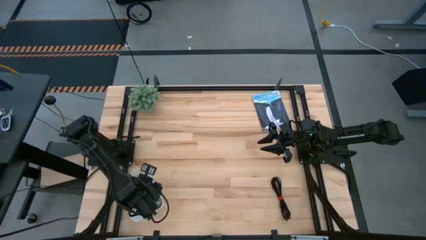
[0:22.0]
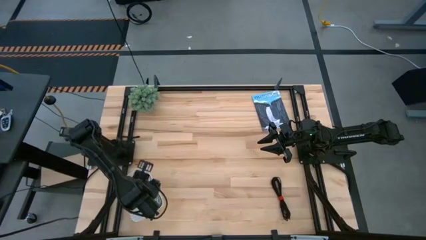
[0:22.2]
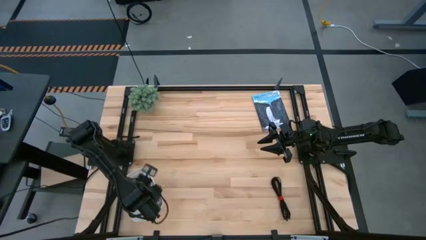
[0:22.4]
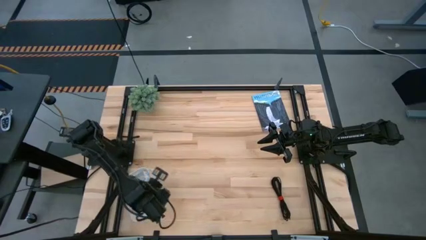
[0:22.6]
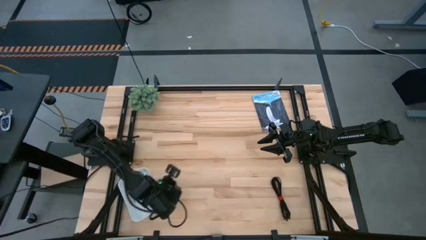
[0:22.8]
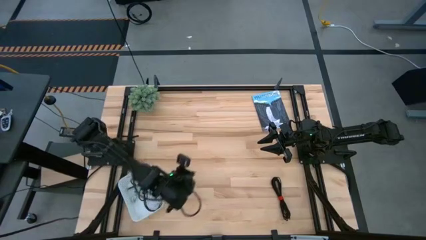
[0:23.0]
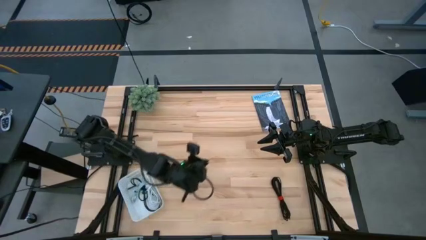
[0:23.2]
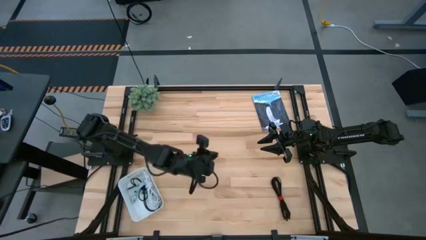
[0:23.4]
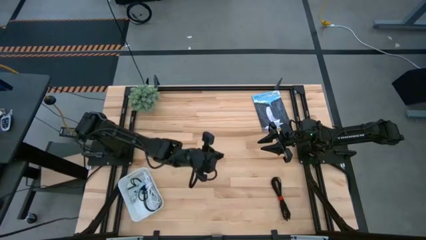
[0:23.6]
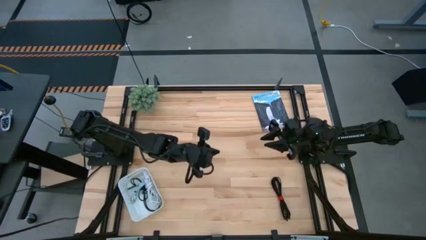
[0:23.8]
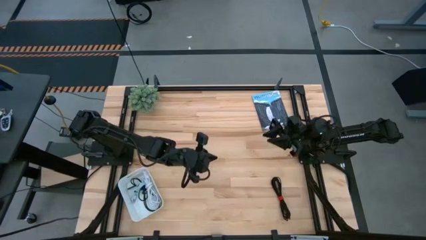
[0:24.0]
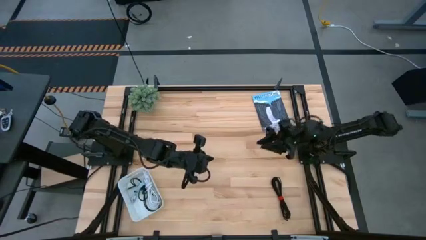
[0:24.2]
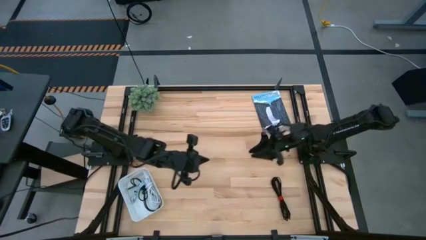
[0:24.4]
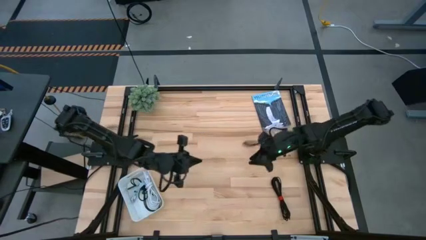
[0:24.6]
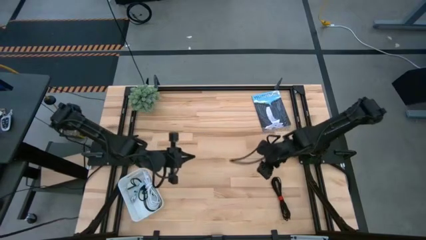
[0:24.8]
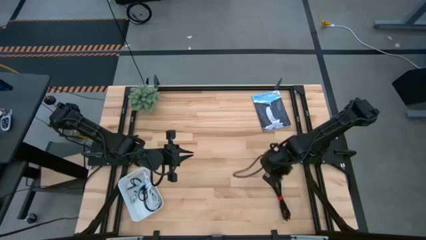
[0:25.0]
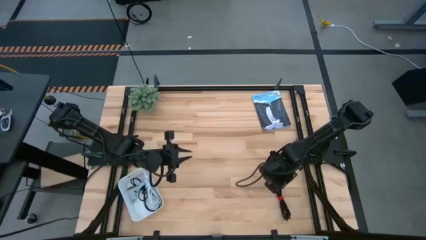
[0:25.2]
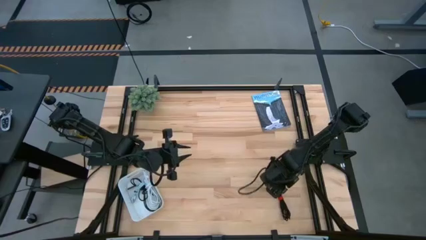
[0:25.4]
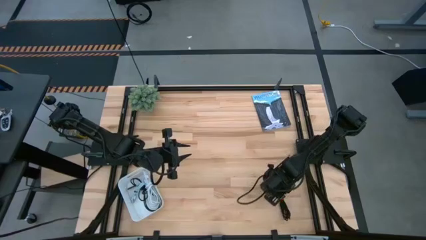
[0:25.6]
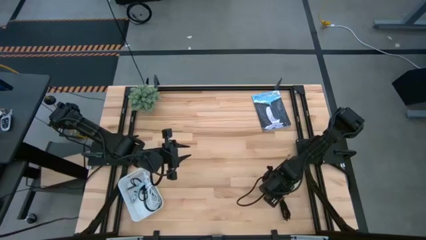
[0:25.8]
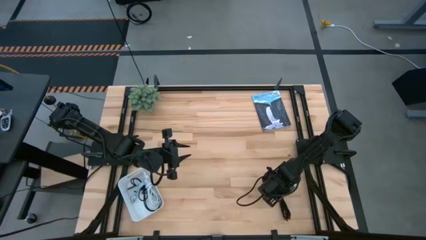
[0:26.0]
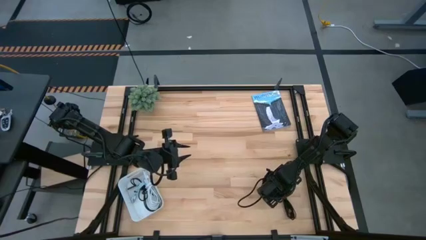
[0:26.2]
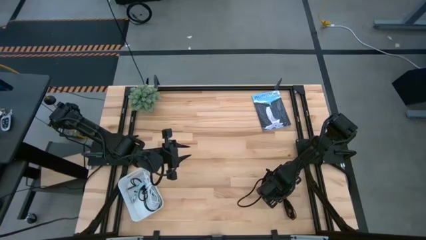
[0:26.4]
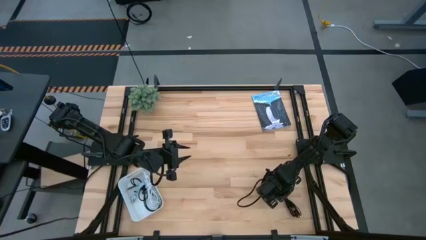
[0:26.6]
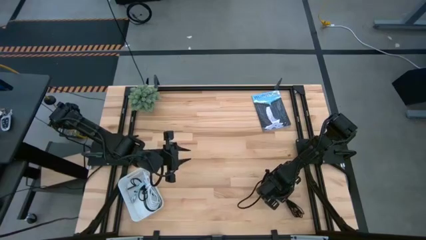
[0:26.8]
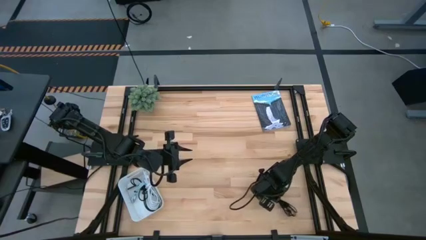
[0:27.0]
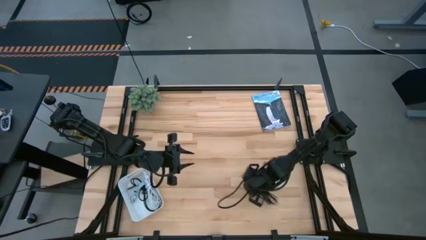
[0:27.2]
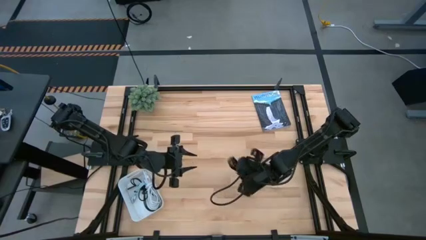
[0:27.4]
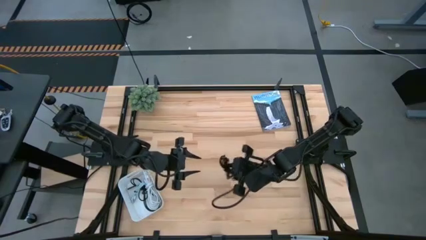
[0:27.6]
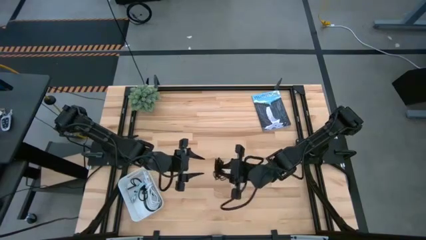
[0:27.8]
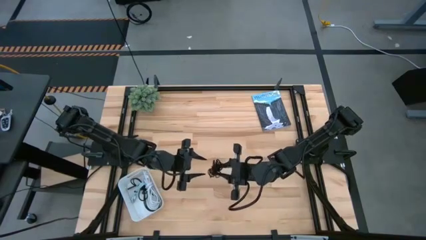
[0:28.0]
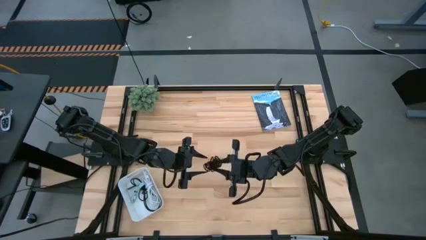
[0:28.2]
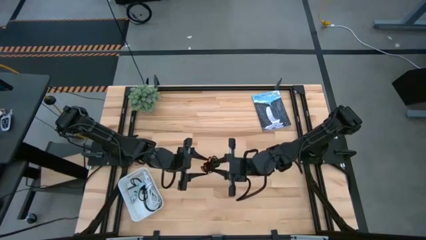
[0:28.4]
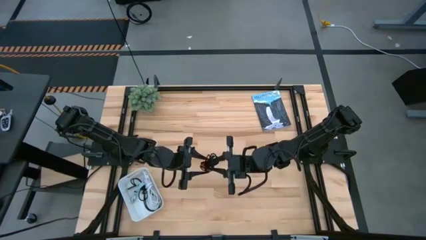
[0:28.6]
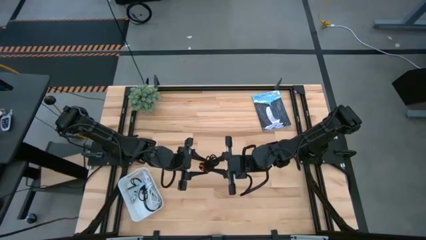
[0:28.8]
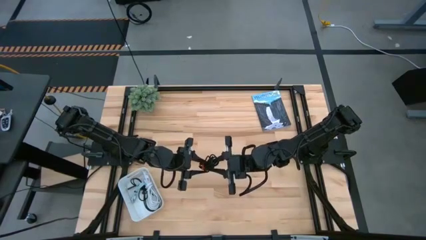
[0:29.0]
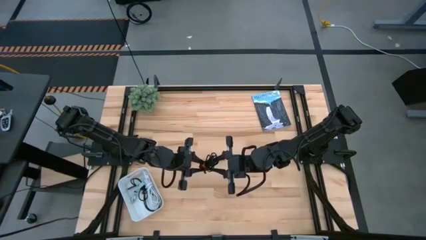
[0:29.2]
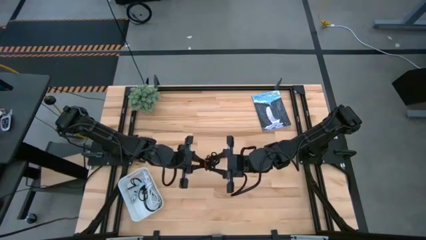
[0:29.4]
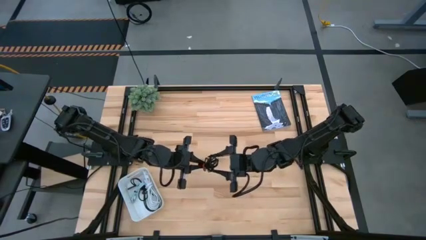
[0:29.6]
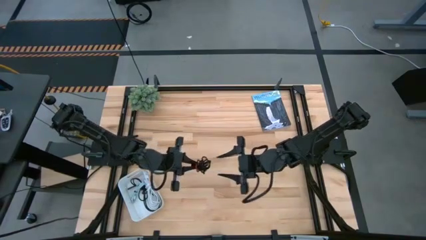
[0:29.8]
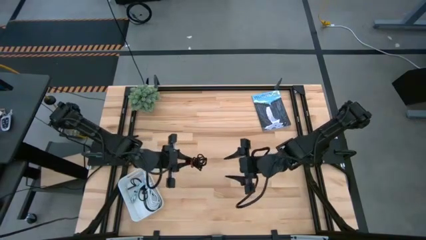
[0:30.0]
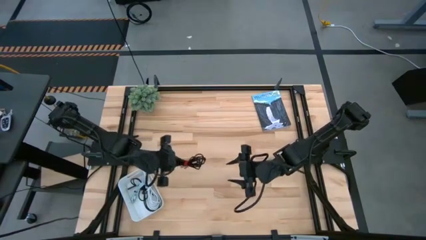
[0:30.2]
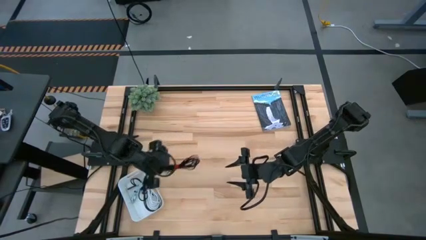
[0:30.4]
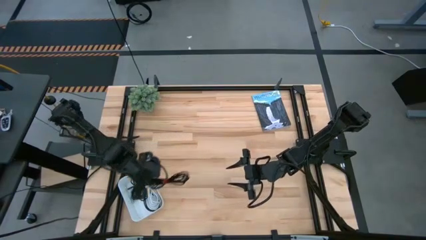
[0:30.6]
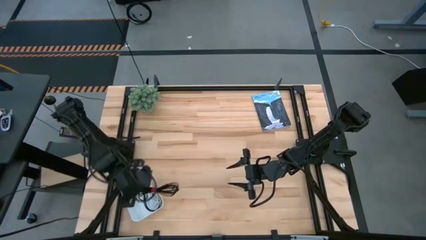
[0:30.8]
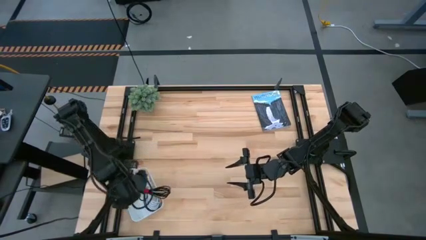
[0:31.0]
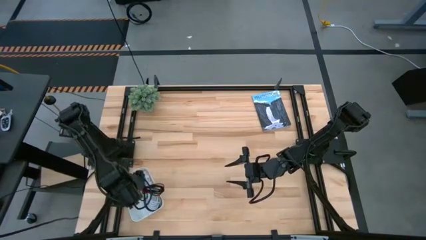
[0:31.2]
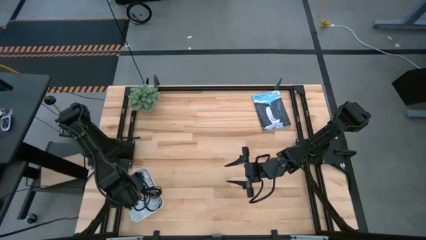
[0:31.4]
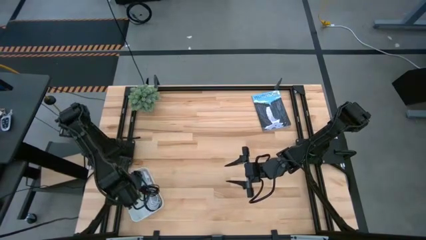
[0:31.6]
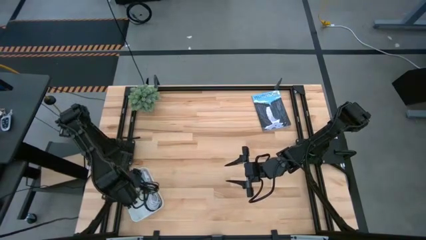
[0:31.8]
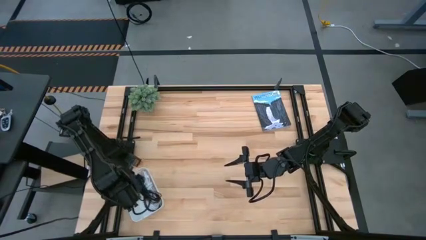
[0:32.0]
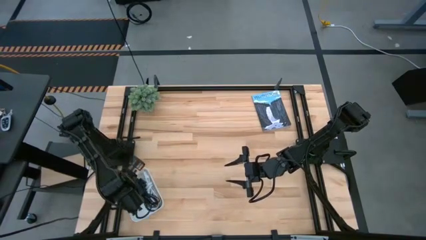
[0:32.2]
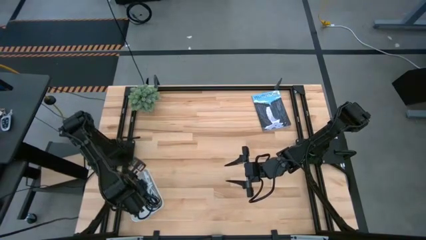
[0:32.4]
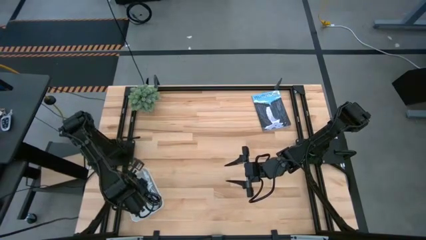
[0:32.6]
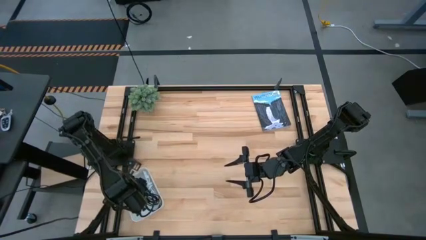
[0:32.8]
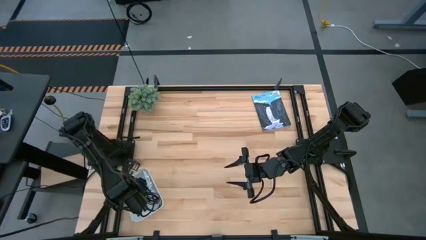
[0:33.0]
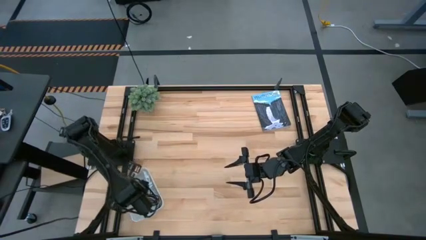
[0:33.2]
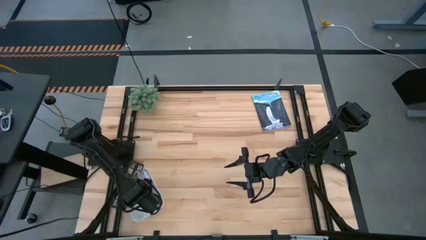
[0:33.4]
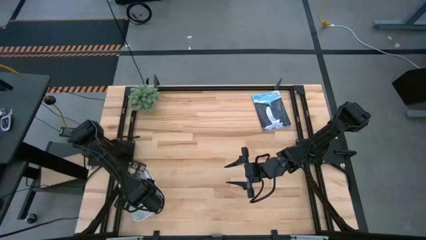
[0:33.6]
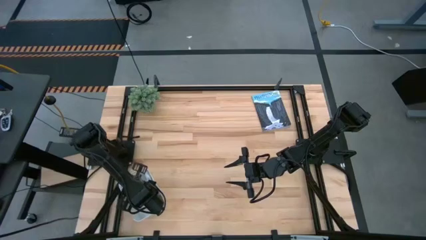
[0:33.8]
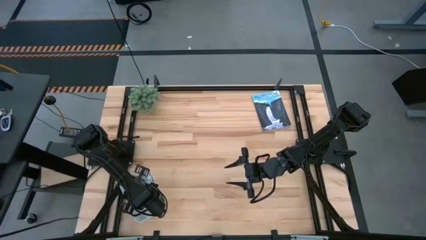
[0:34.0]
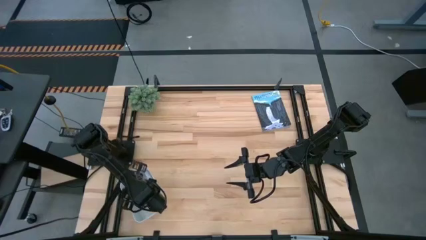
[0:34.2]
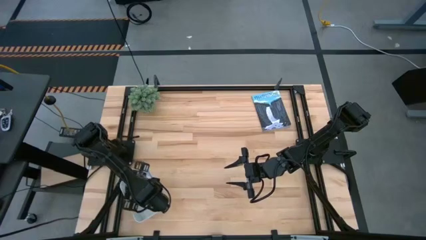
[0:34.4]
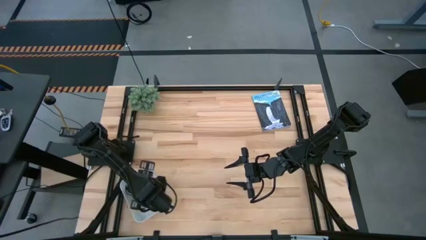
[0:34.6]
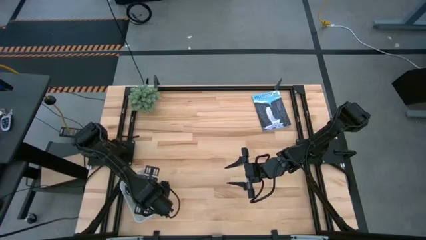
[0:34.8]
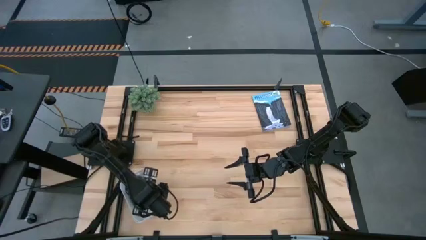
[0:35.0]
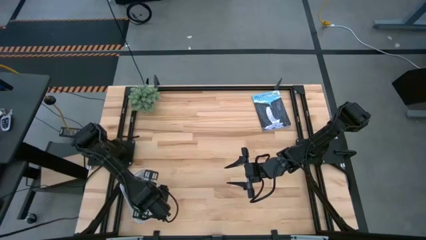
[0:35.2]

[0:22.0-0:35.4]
Task: Pick and place USB-C Cables
Put the black usb cable into the white bin
